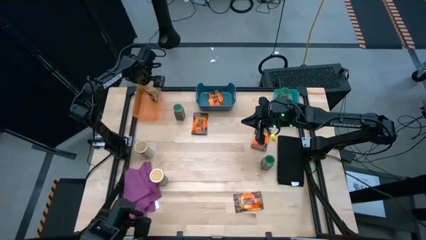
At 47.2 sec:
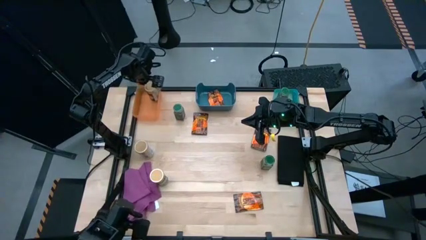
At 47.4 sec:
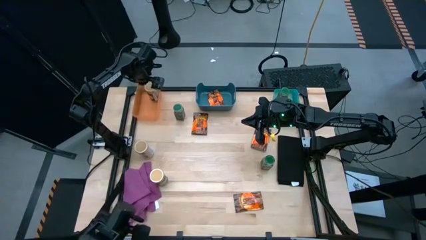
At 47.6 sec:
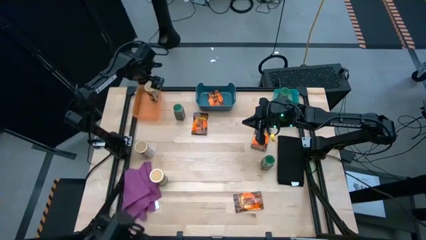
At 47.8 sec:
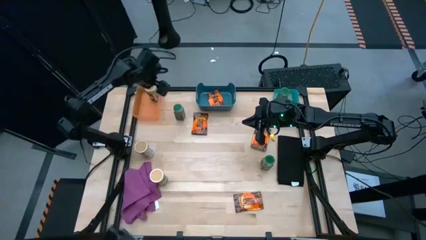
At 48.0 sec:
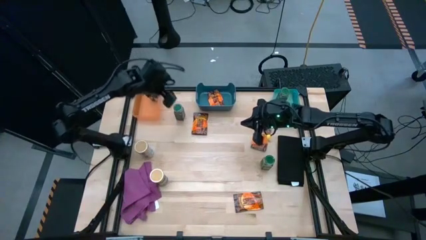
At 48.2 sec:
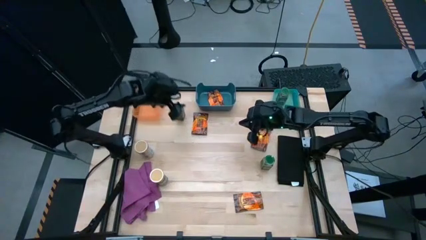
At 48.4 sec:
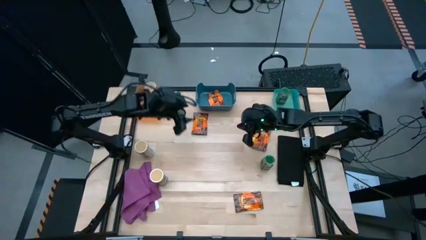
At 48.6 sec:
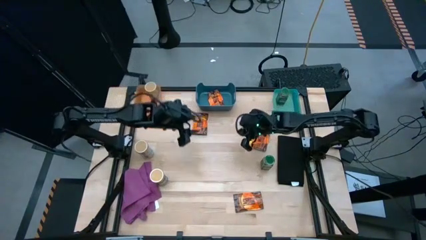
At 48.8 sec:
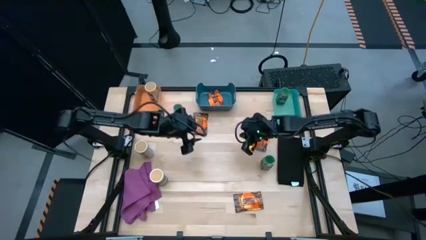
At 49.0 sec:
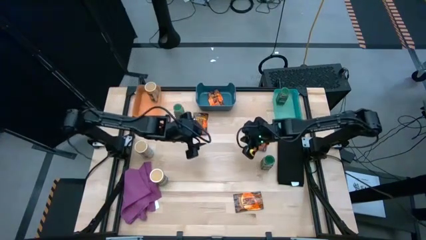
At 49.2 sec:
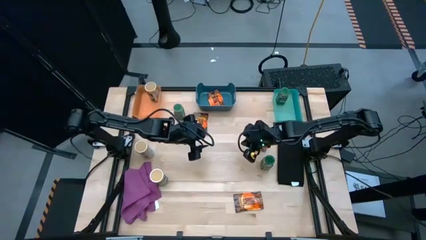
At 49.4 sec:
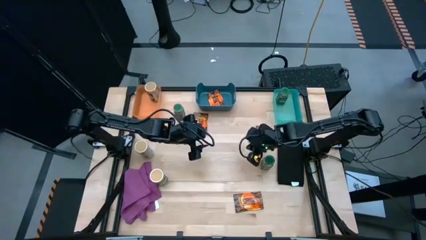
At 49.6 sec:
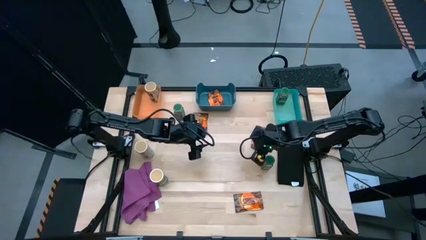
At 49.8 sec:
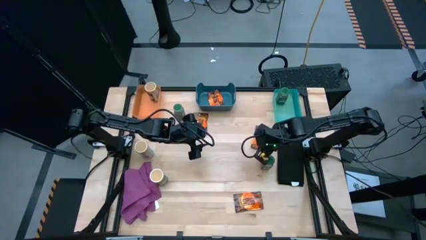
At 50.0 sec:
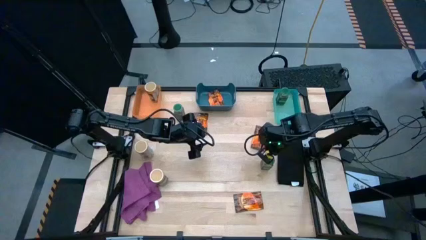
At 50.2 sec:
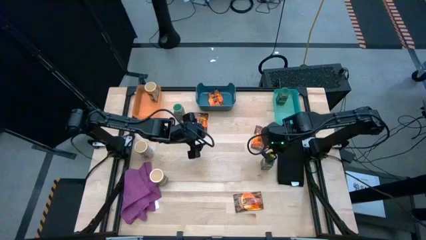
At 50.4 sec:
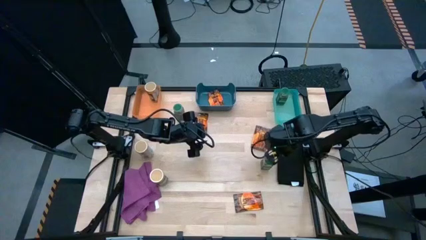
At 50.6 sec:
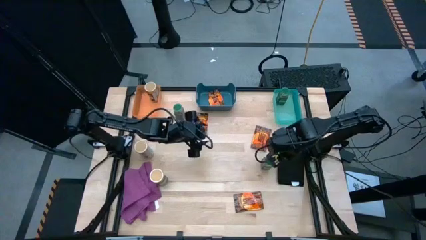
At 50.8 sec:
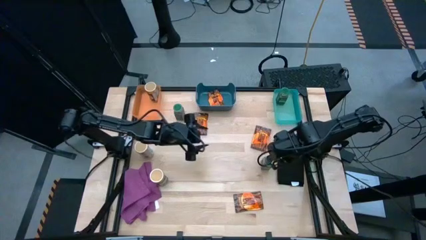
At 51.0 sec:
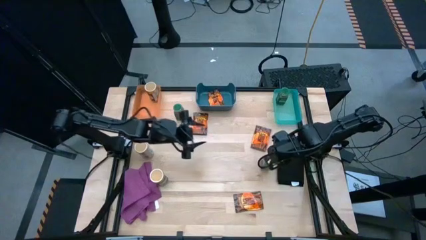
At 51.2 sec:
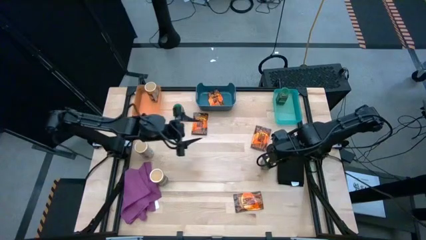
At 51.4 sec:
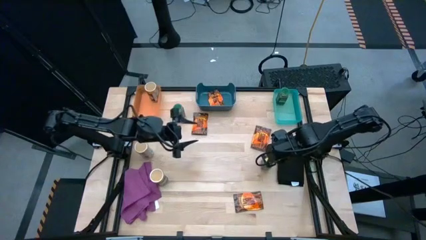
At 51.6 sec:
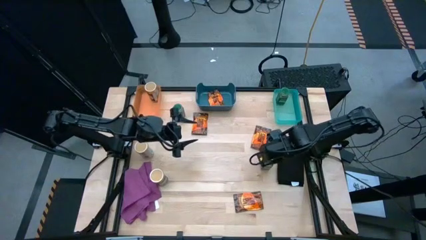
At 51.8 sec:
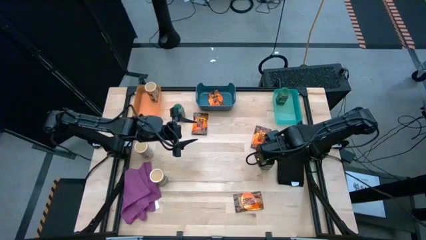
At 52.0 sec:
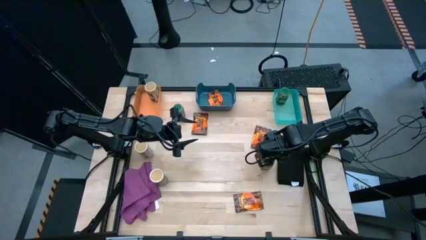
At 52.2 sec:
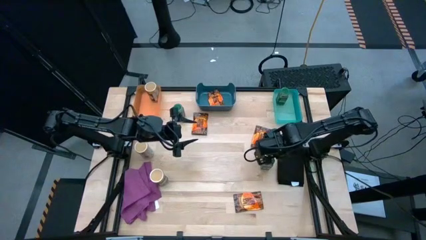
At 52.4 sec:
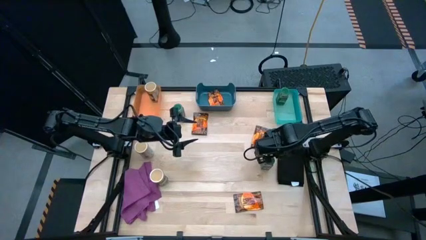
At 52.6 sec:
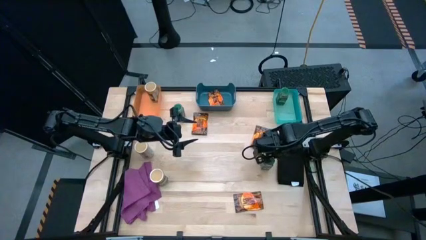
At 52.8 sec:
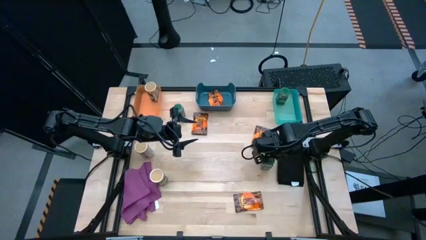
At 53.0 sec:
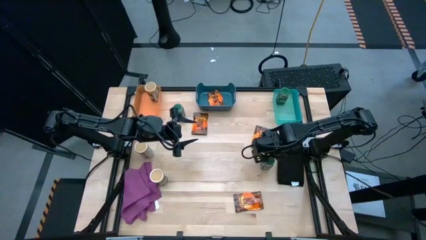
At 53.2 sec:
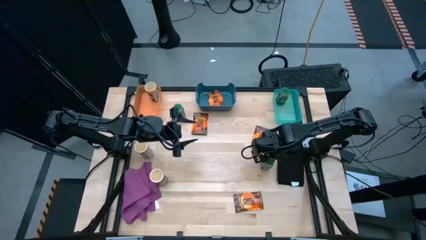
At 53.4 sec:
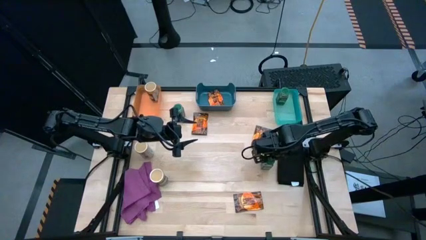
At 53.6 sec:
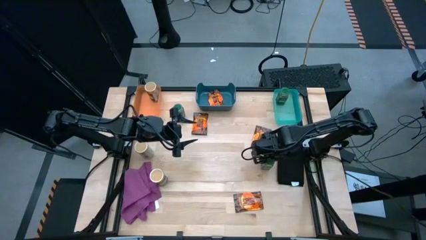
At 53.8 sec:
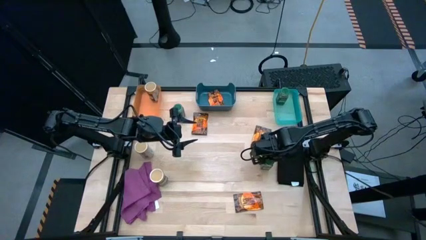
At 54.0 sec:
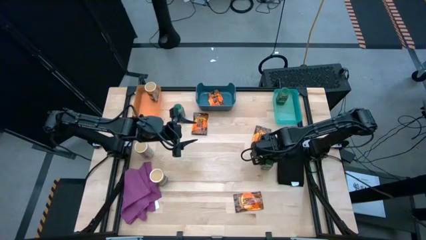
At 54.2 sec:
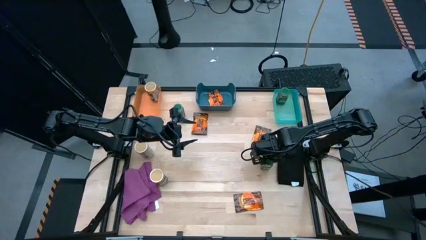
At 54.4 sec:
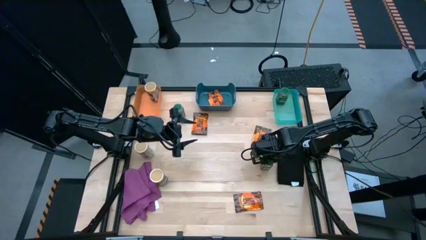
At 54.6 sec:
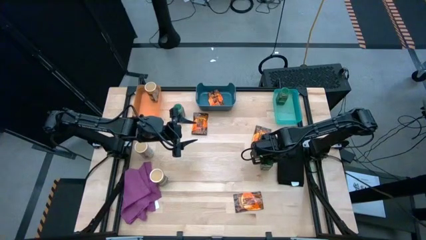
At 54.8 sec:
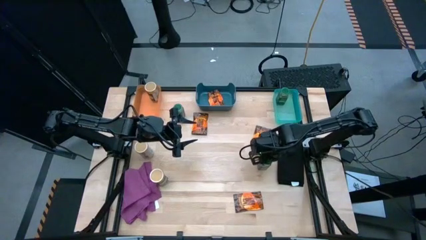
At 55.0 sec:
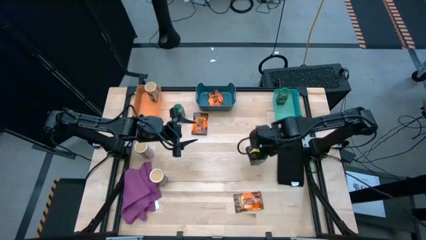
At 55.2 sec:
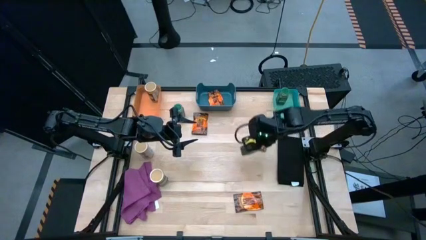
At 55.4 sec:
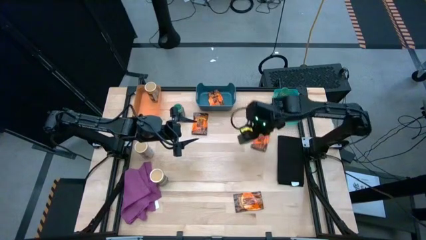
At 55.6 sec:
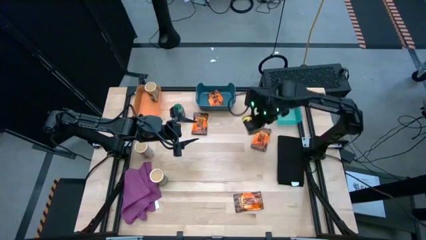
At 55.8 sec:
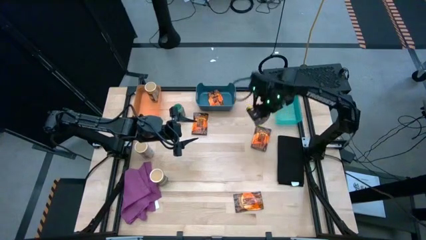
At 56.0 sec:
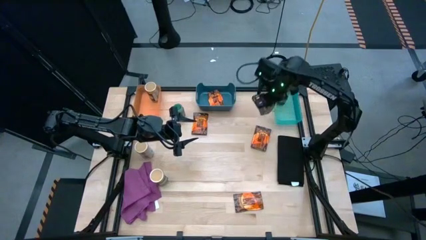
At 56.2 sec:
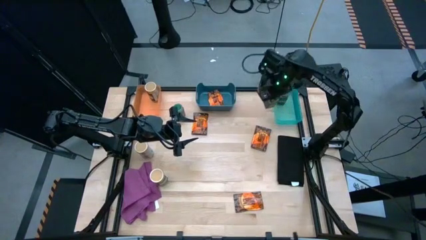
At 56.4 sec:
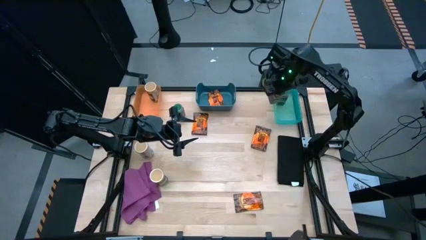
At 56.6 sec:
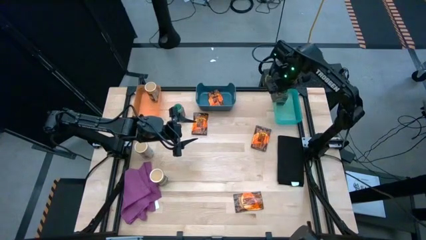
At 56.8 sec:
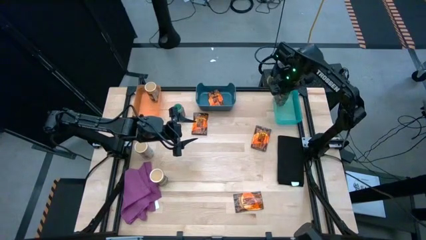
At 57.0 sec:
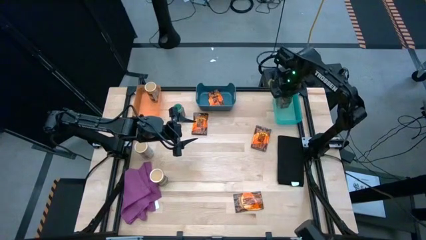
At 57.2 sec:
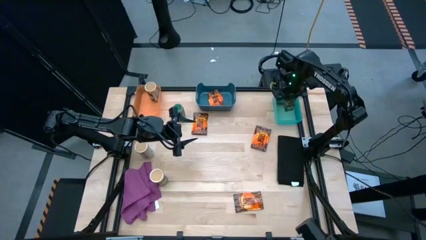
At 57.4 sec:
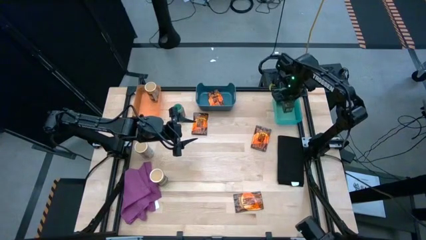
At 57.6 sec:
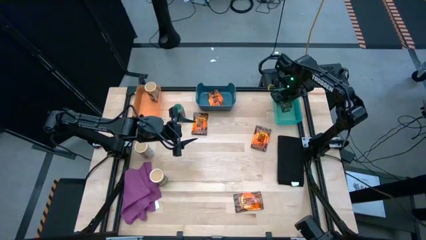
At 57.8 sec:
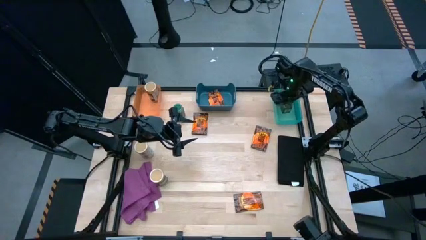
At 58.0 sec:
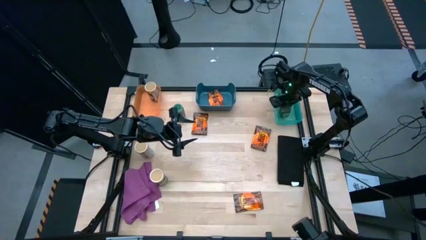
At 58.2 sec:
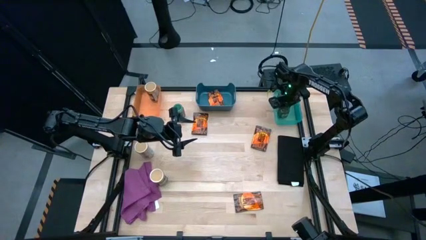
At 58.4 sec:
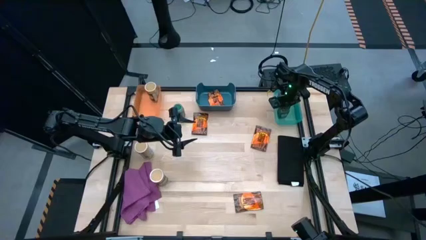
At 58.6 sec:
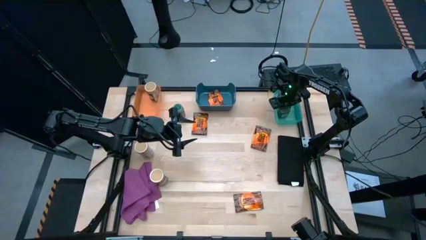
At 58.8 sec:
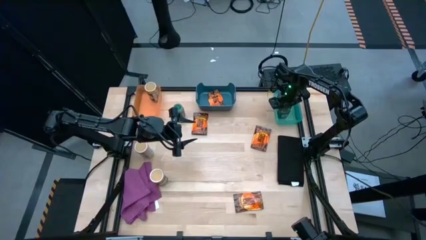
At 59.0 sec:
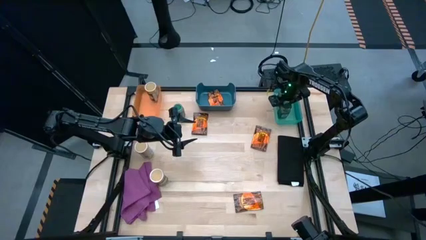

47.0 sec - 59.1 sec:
Task: Sort spices by type
Put the right green seasoning bottle into the light blue bin

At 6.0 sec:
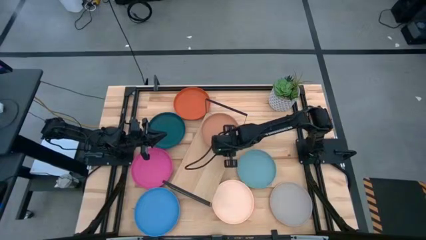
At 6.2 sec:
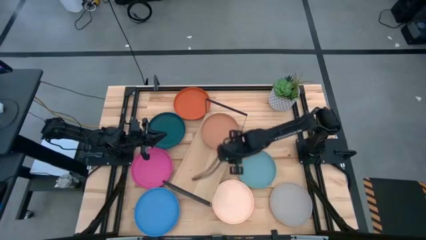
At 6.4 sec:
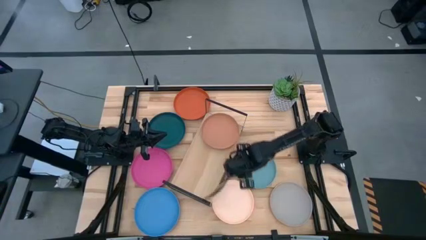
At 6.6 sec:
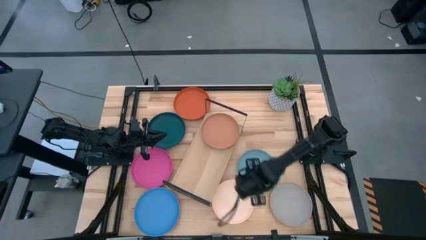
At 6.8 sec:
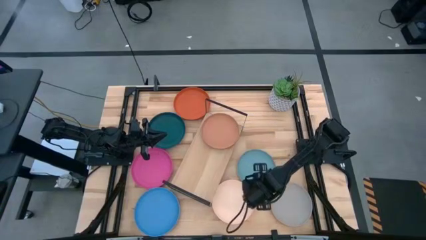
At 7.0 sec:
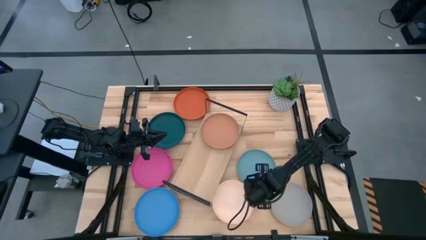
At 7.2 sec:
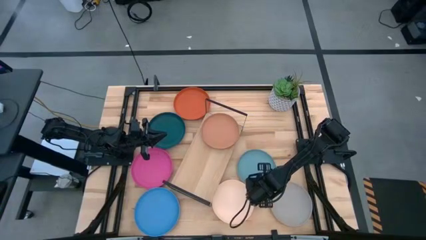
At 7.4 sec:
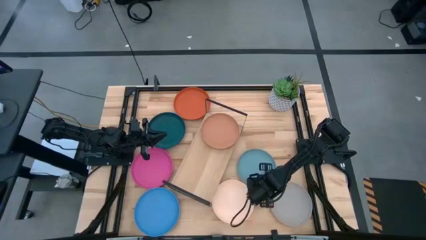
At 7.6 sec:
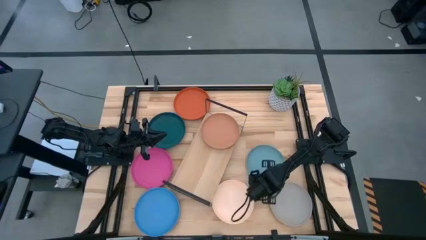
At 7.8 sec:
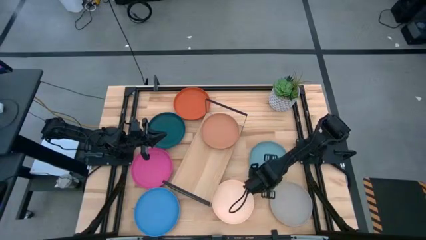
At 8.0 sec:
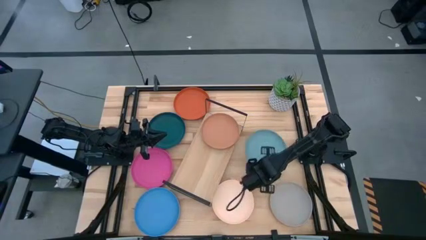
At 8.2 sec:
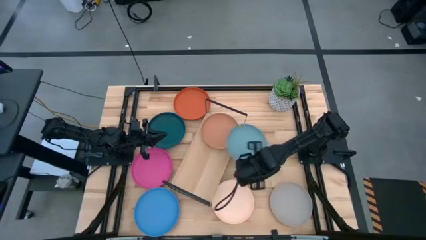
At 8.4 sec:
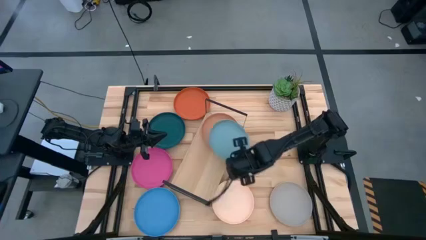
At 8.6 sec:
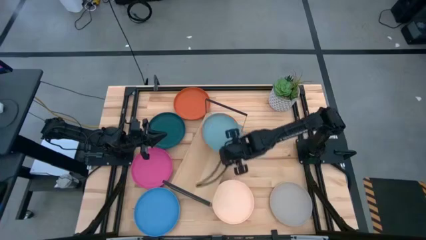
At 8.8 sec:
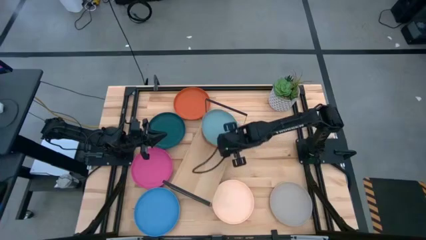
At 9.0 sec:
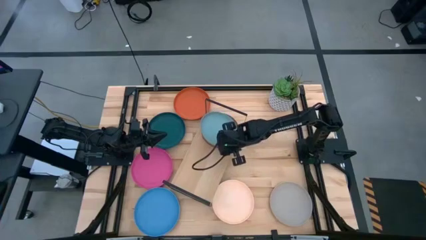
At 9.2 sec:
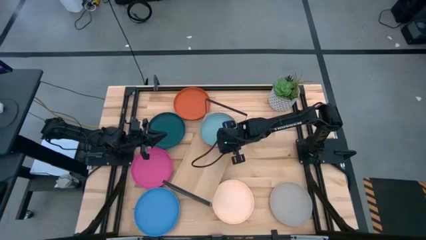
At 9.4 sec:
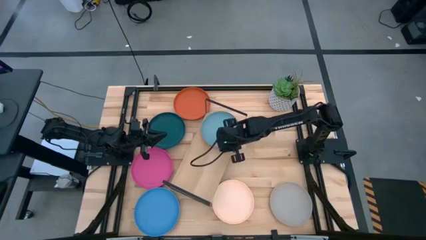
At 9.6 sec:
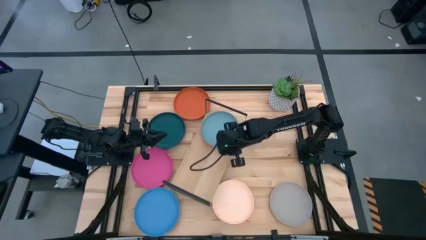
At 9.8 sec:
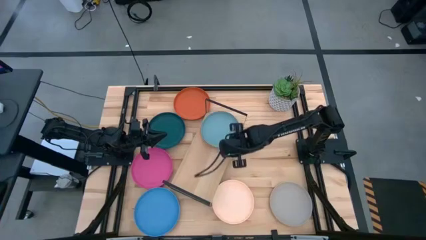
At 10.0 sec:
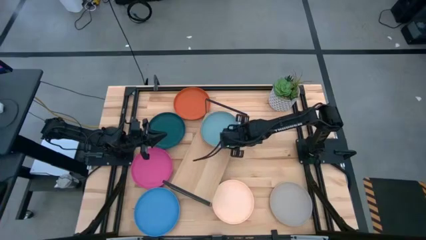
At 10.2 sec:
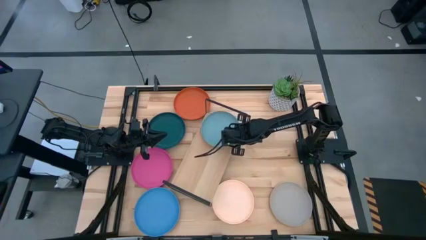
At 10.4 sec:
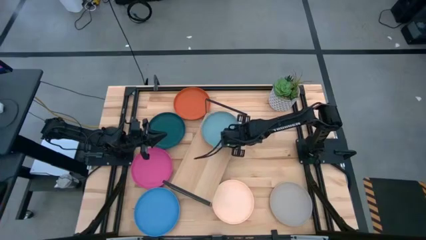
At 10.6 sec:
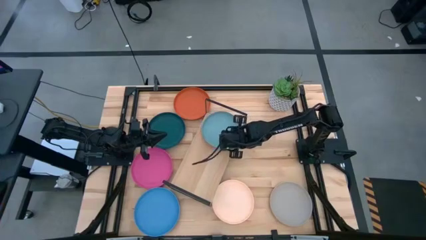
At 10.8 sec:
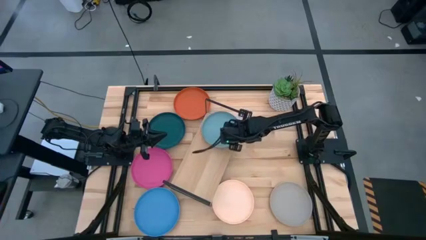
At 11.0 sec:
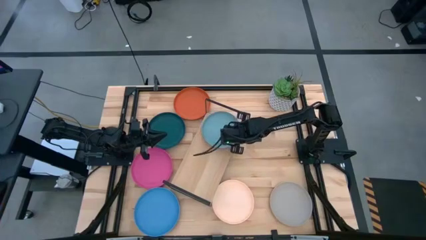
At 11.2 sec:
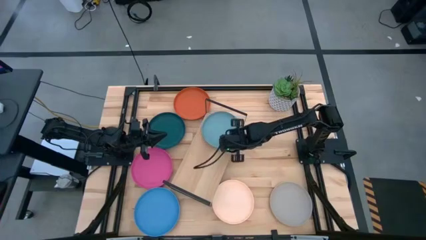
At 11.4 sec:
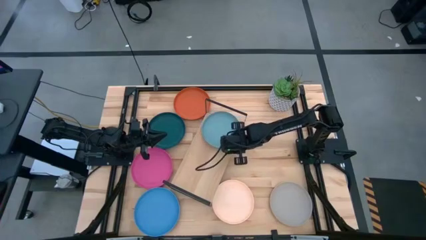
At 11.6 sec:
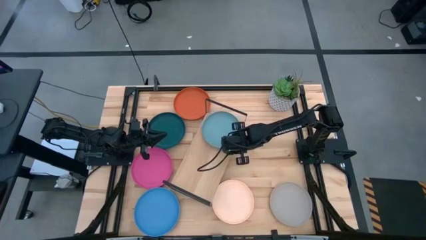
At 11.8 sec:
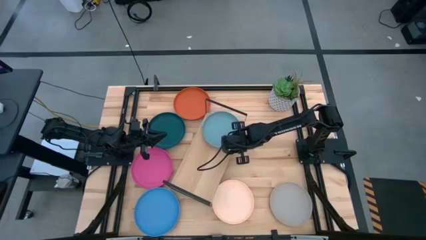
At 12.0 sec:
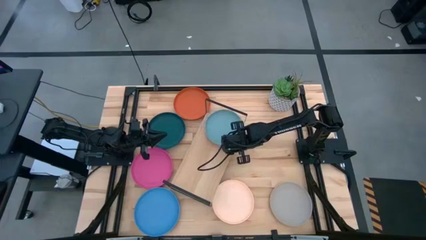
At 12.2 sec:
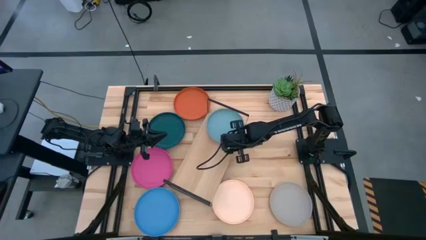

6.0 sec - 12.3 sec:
Task: Place and stack plates onto a shelf
Stack the light blue plate on top of the brown plate on the shelf
